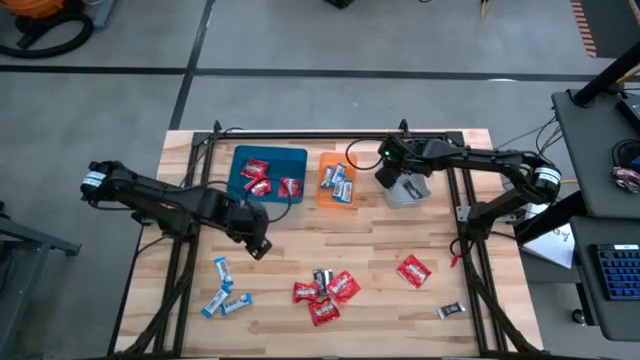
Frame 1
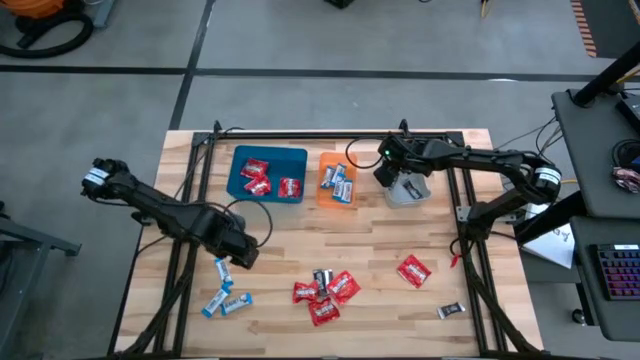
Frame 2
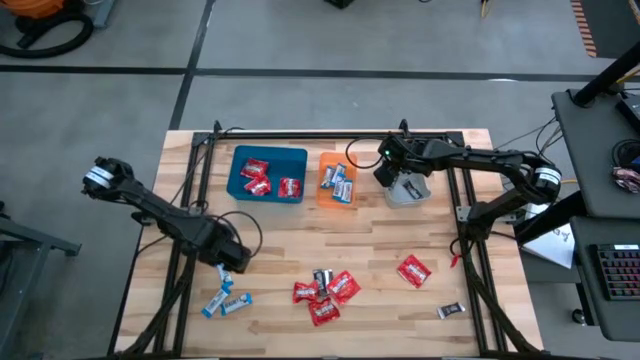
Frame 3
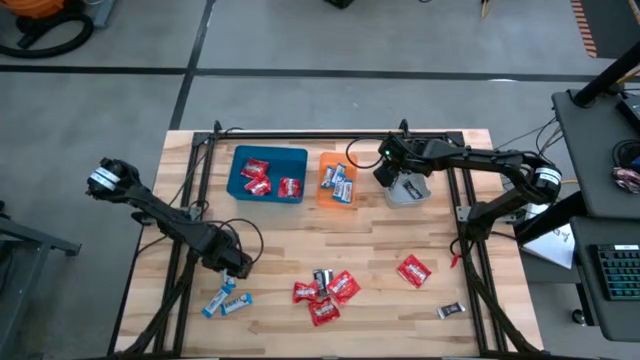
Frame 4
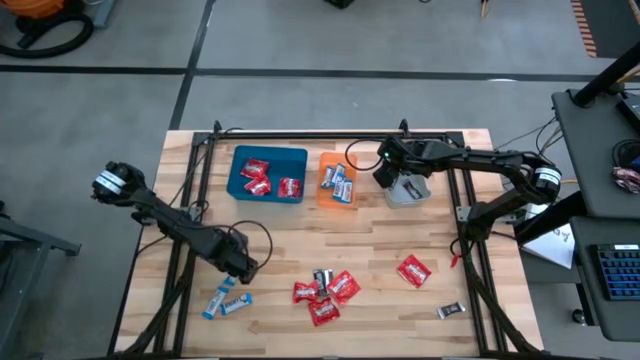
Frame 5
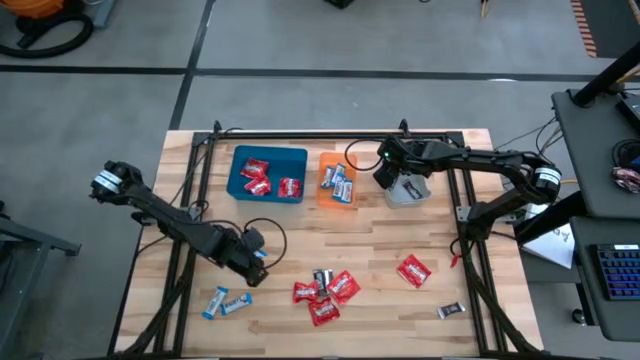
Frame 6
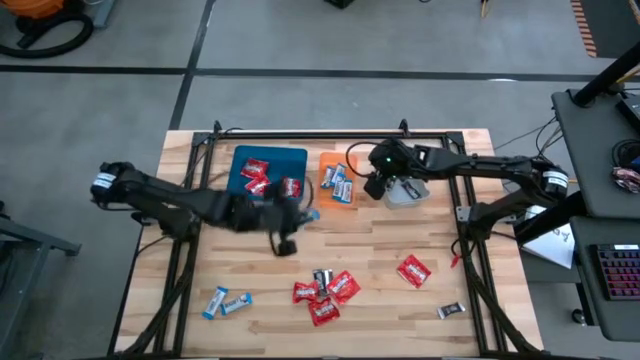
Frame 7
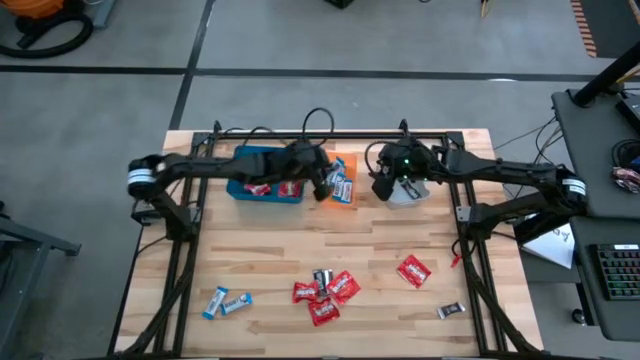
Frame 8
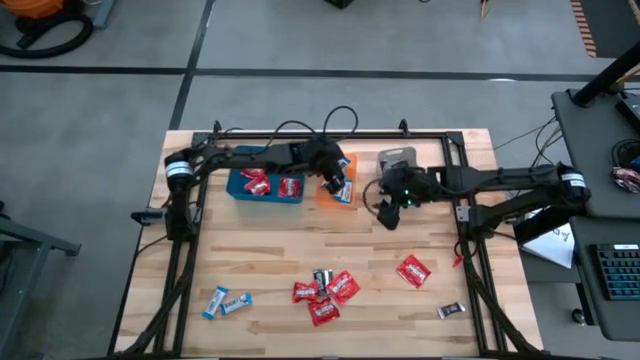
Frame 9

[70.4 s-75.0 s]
Task: Sort candy
Put the white chocolate bar into the orange bin

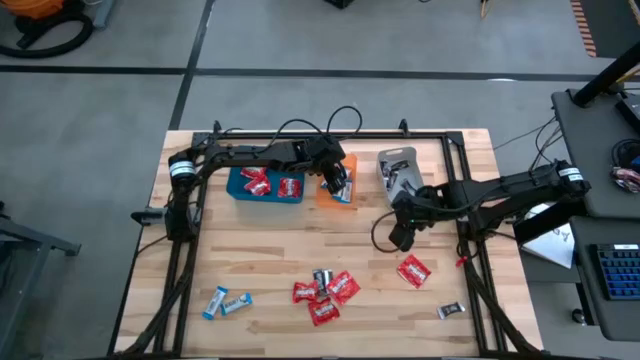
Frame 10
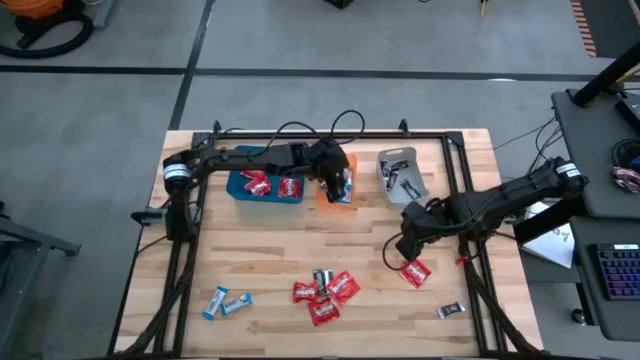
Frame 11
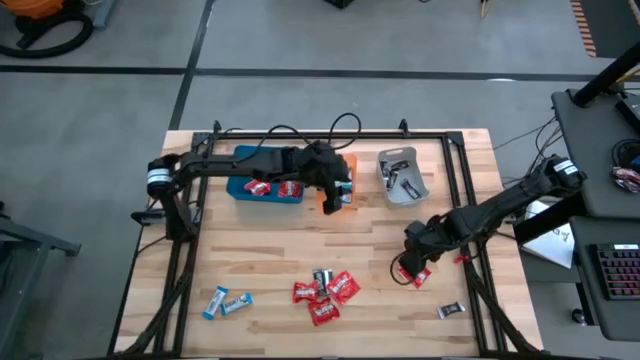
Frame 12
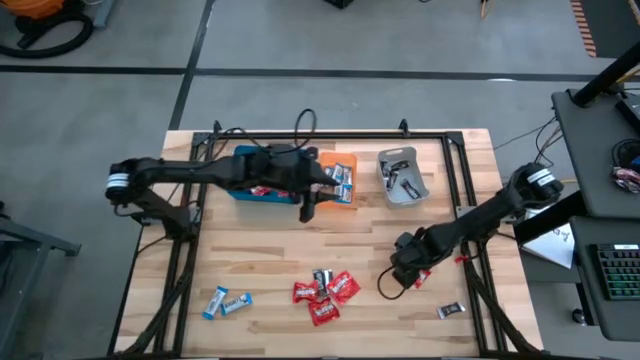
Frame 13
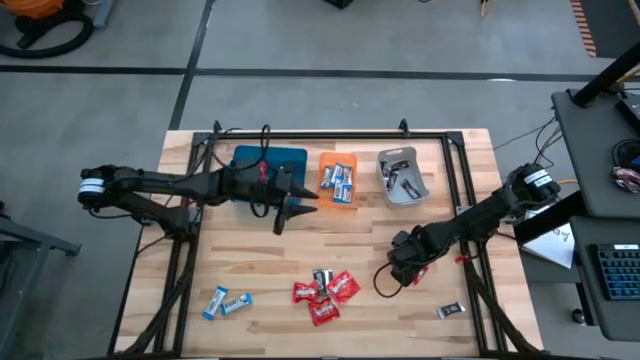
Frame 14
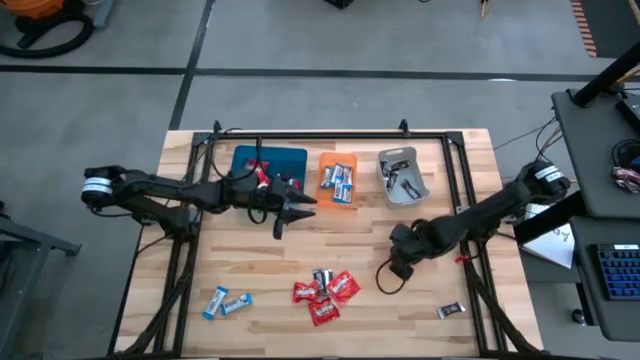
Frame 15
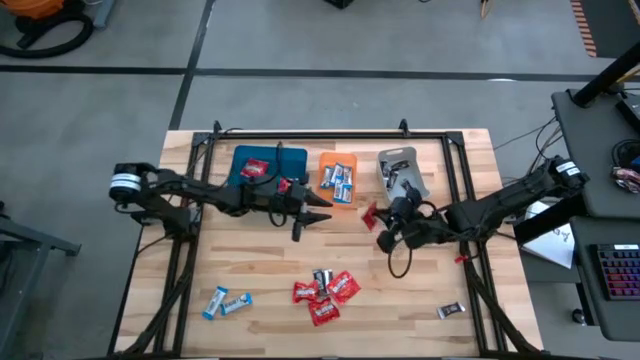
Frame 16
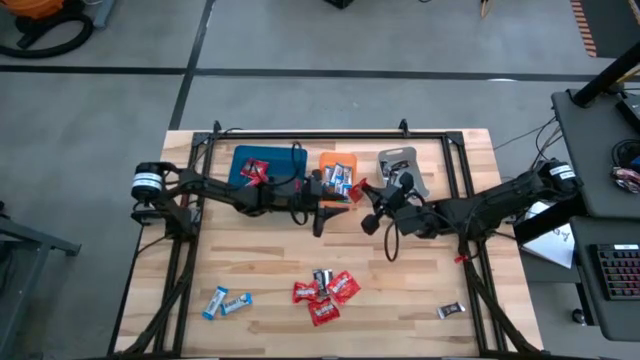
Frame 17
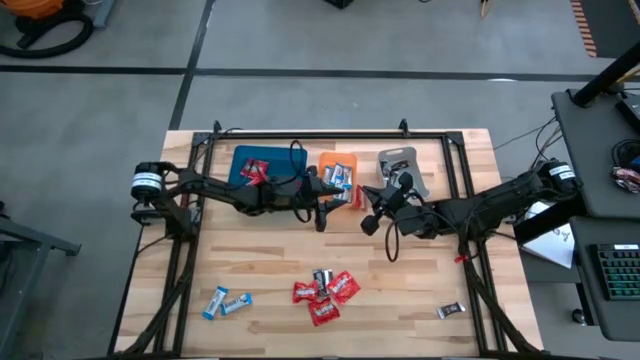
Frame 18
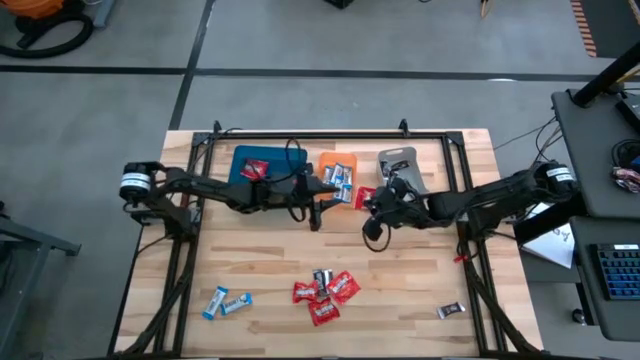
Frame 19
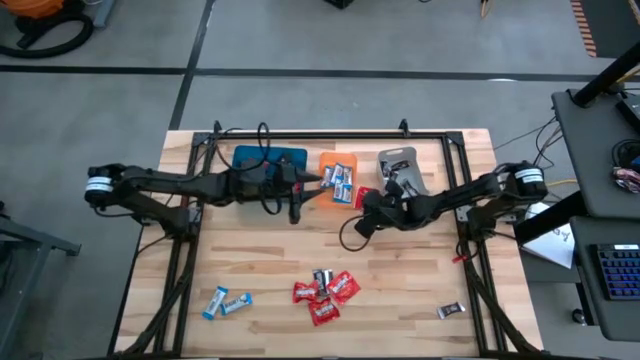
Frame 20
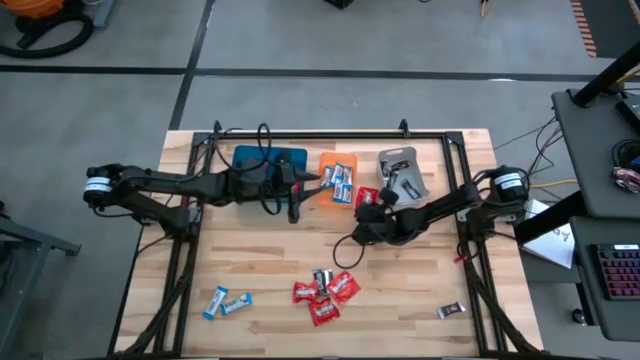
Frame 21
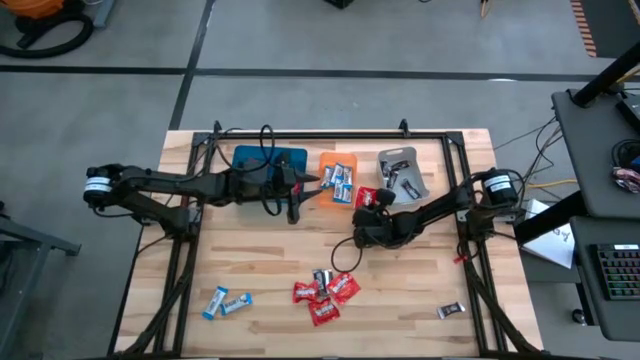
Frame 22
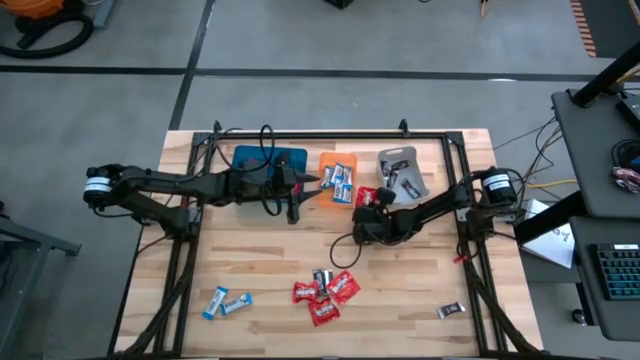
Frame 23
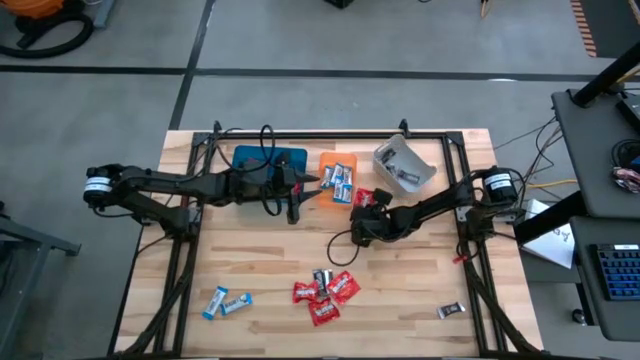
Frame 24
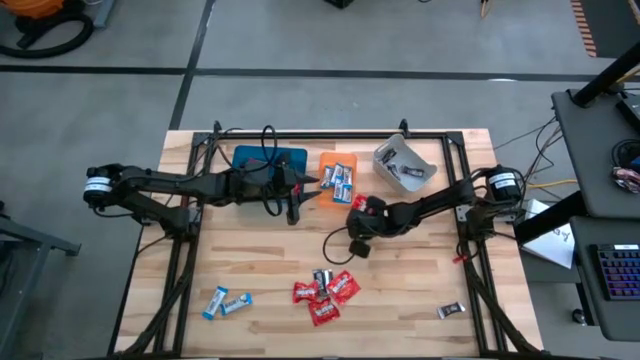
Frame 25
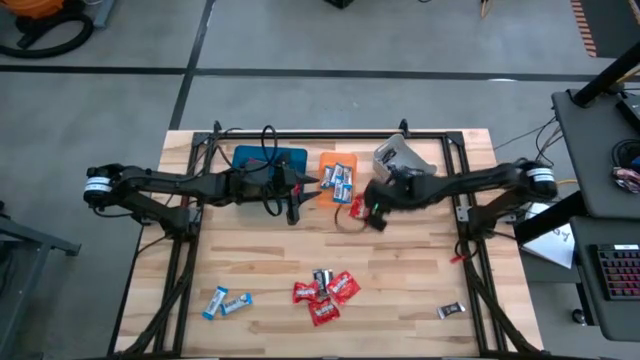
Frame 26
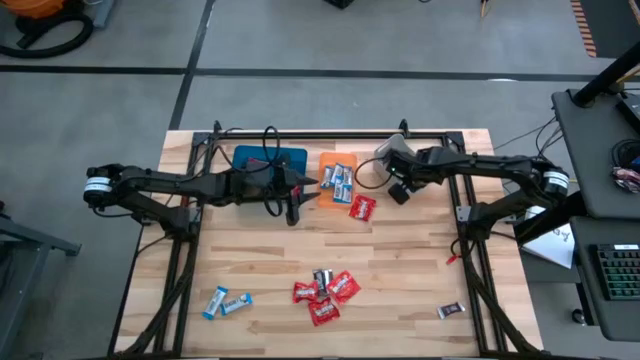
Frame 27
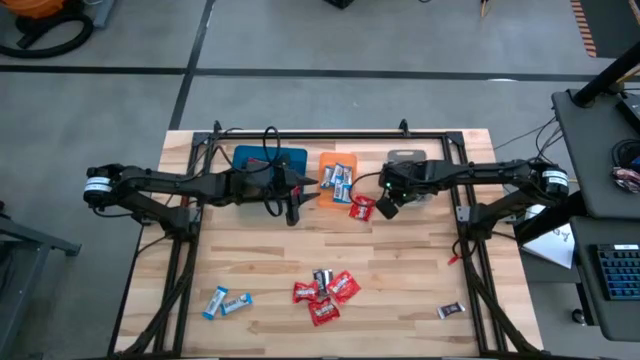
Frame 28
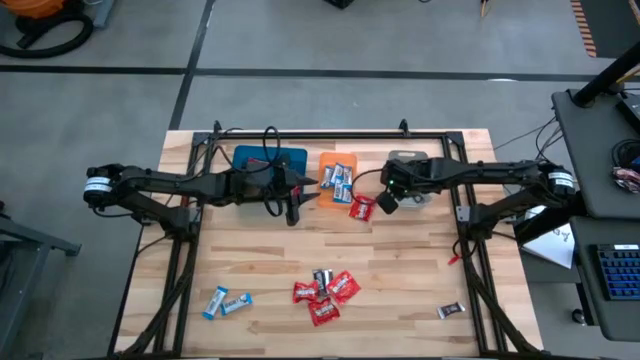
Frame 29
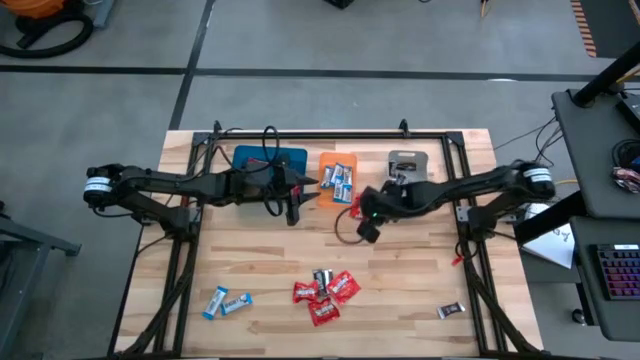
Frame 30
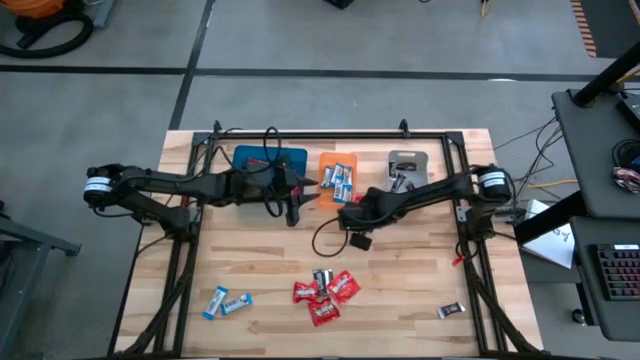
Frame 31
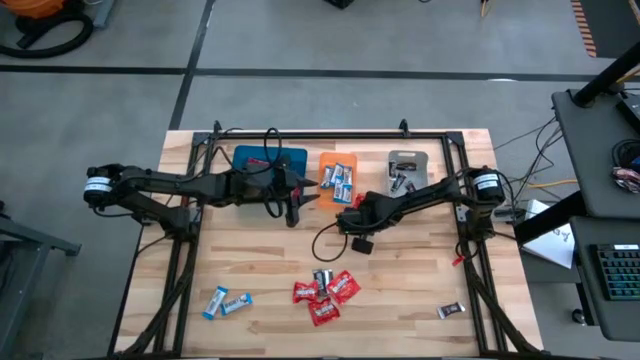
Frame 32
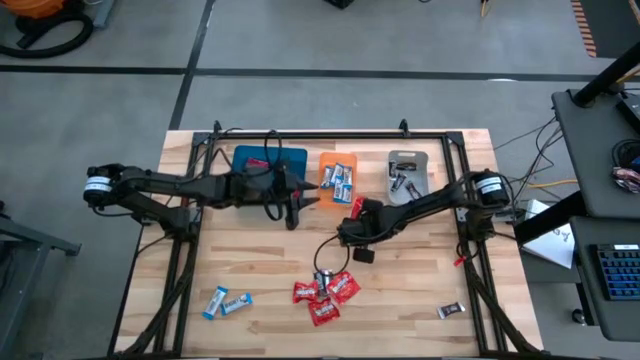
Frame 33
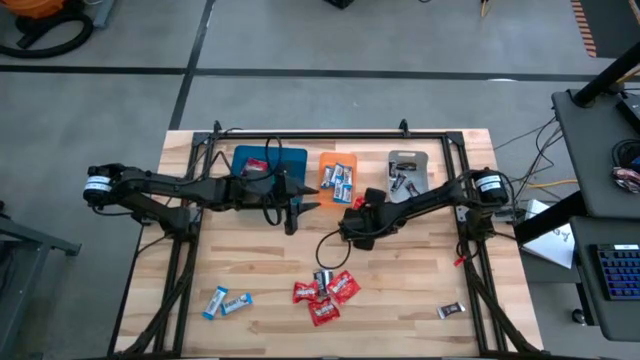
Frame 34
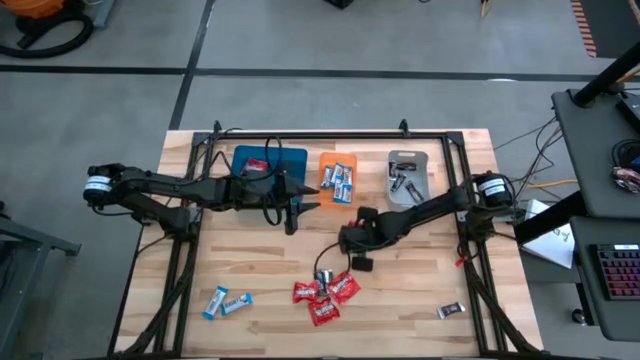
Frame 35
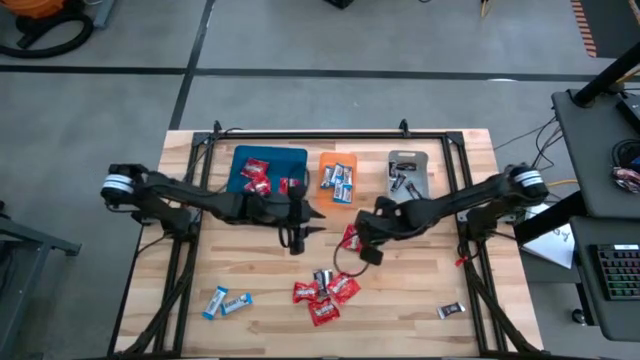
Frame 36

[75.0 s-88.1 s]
Put the red candy into the blue bin

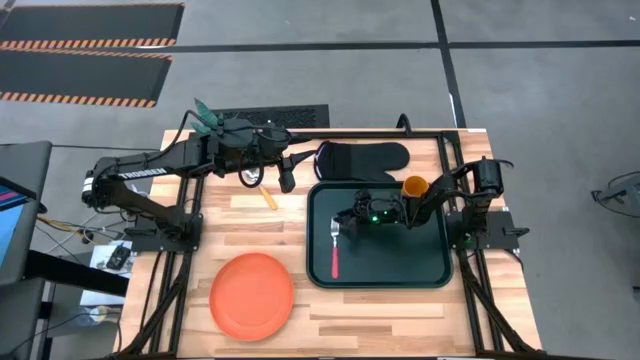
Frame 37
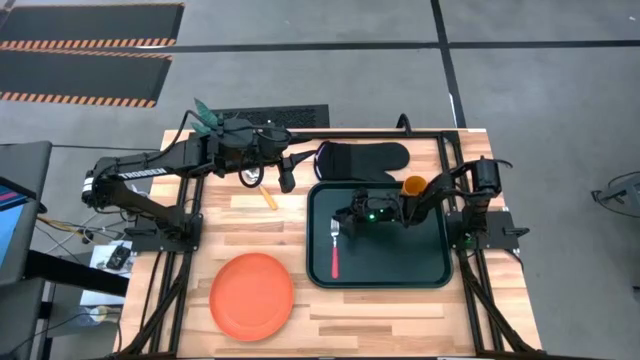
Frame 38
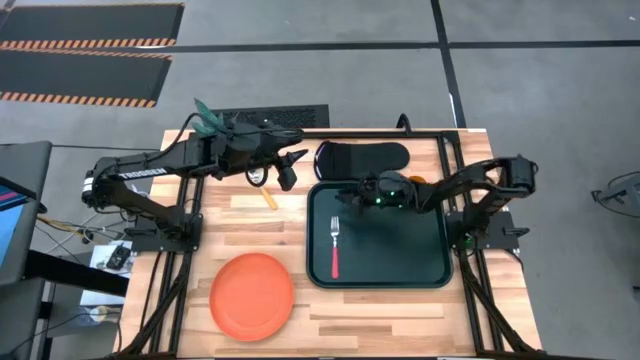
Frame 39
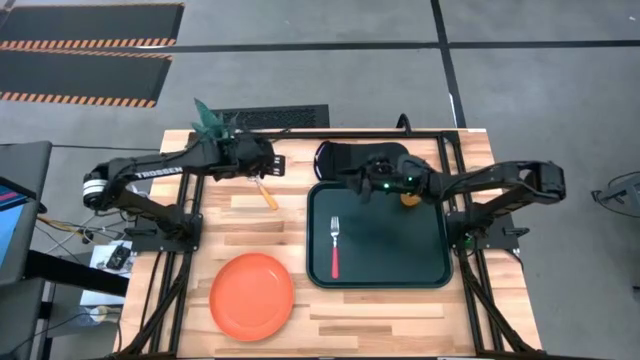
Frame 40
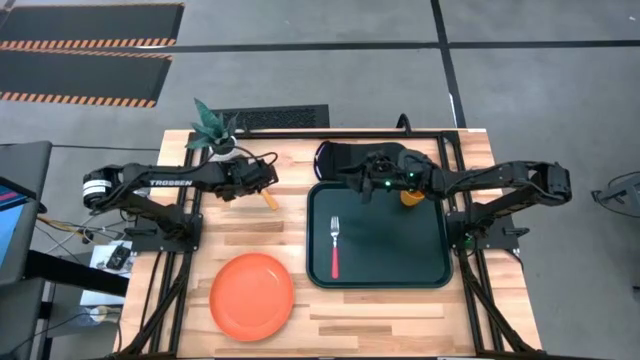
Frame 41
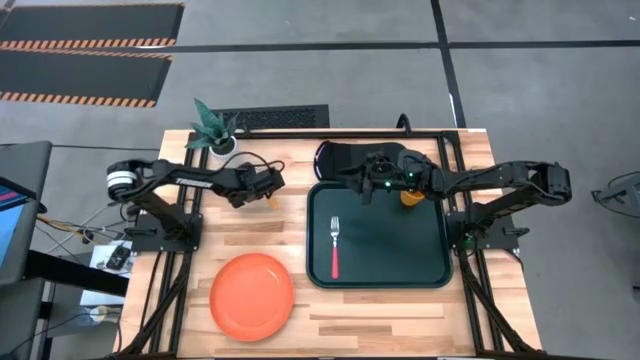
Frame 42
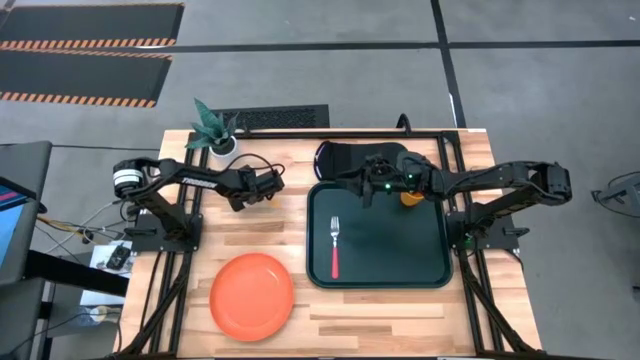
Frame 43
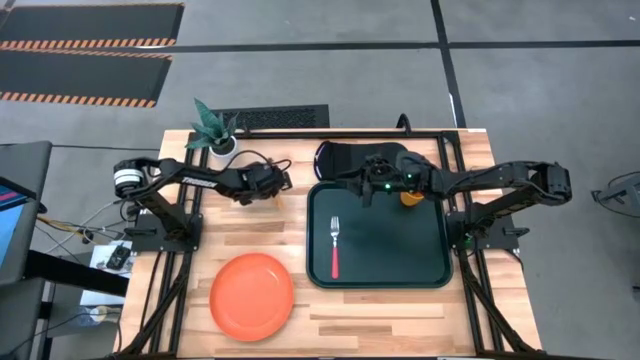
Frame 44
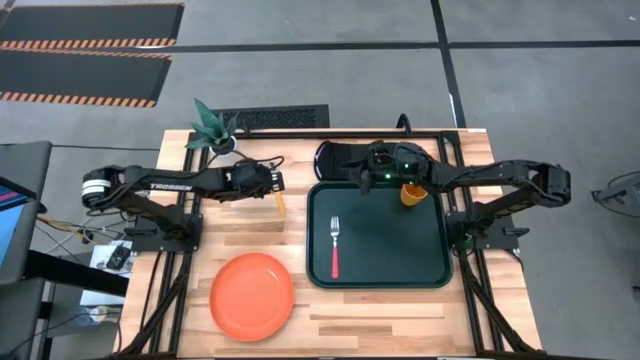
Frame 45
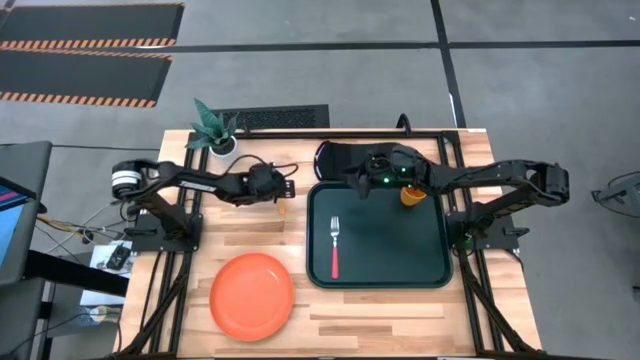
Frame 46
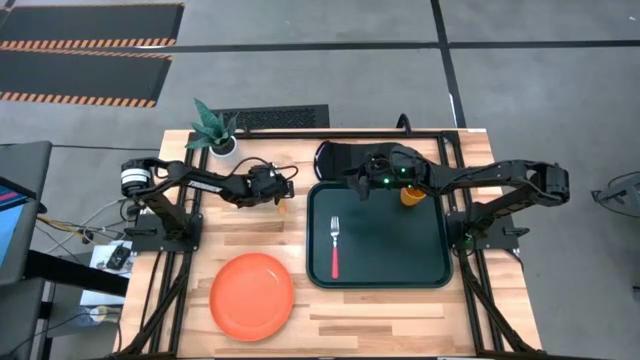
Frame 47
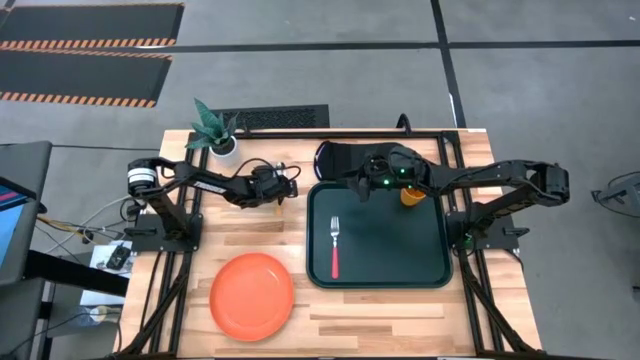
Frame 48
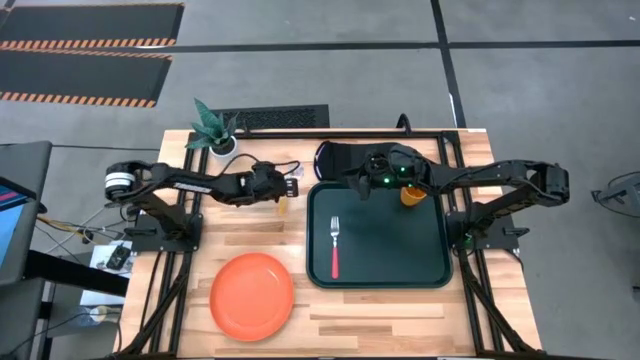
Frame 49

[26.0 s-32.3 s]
Task: Pick and place plate/cup/fork/spoon on tray
Put the yellow spoon to the left of the pink fork on the green serving tray
